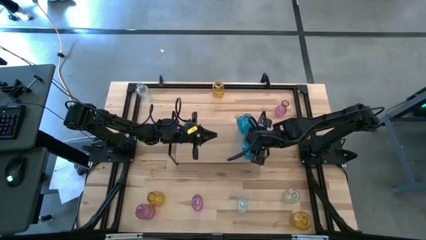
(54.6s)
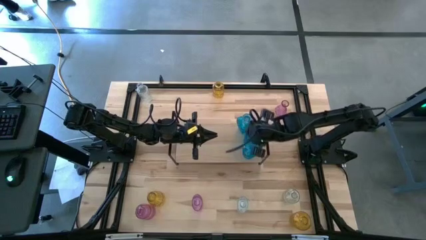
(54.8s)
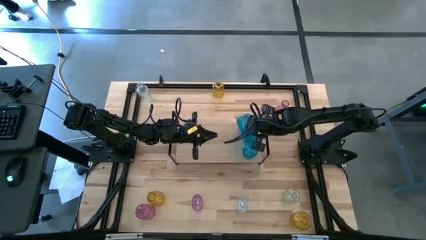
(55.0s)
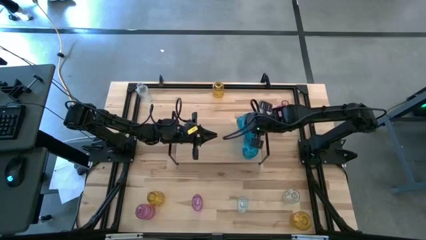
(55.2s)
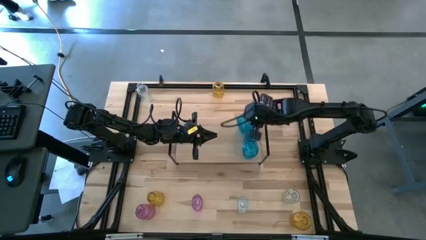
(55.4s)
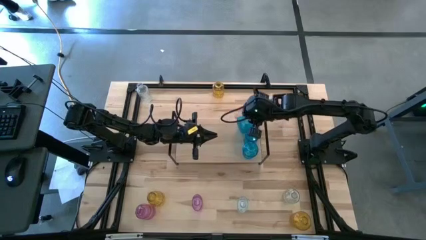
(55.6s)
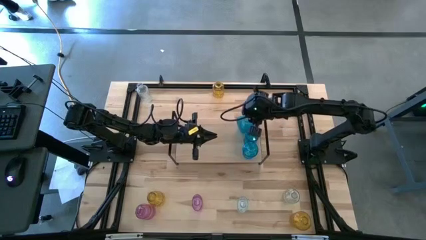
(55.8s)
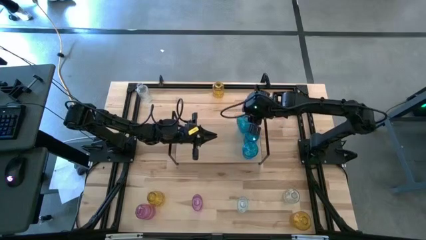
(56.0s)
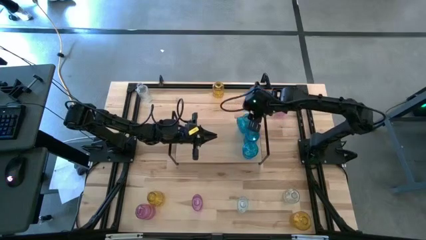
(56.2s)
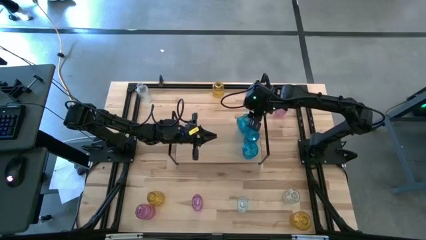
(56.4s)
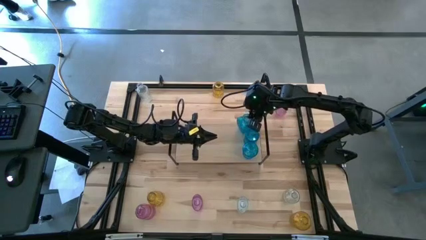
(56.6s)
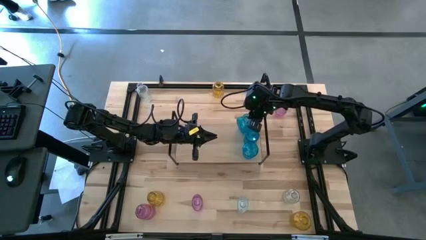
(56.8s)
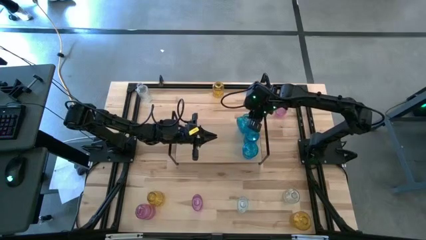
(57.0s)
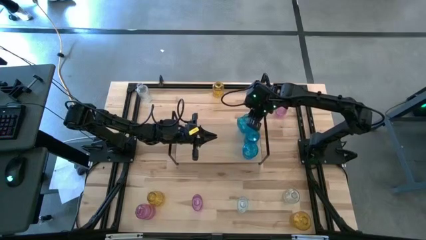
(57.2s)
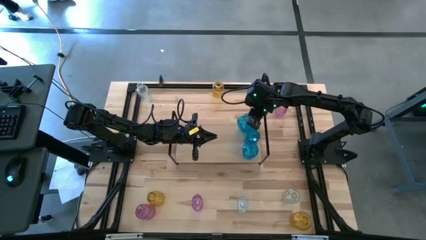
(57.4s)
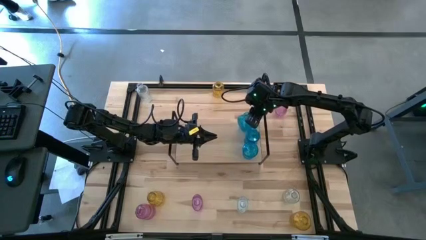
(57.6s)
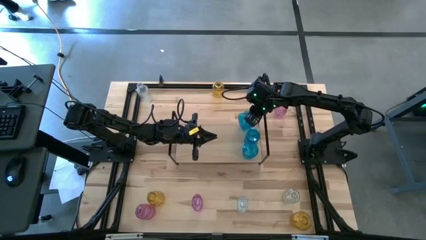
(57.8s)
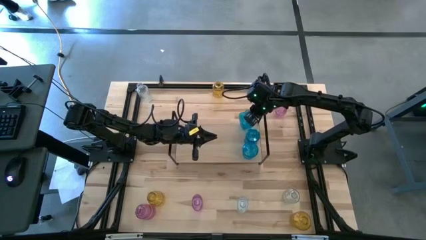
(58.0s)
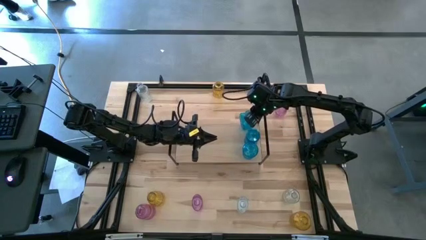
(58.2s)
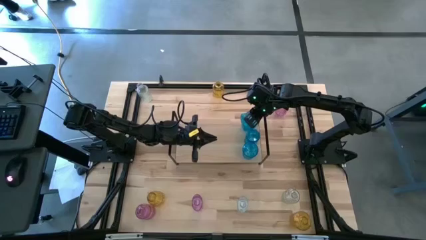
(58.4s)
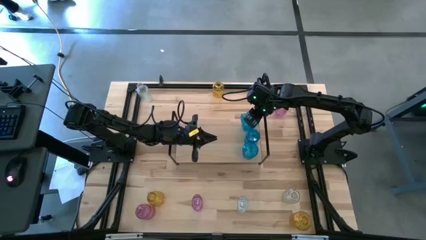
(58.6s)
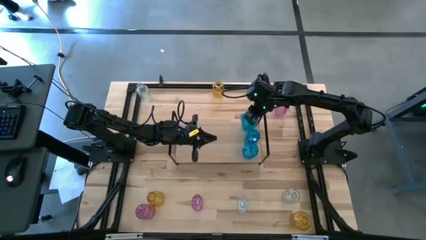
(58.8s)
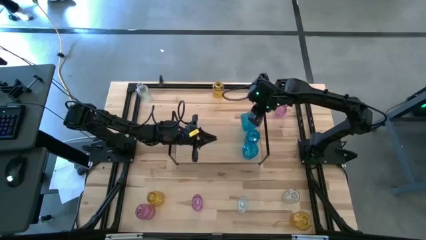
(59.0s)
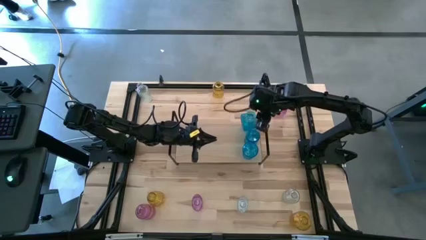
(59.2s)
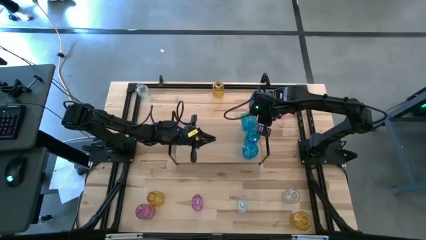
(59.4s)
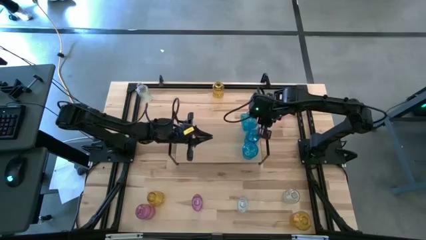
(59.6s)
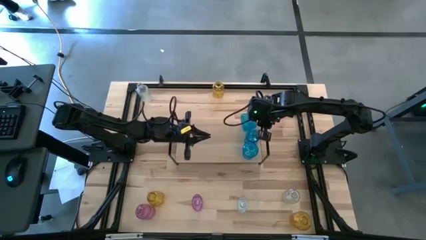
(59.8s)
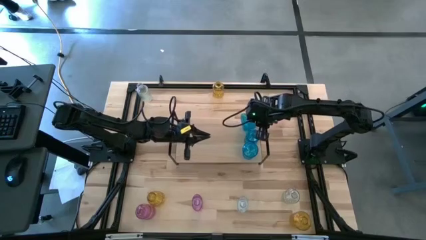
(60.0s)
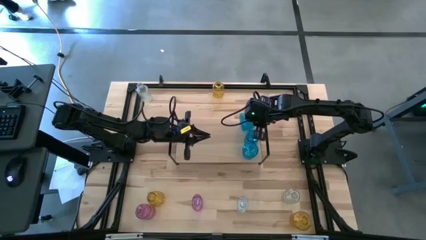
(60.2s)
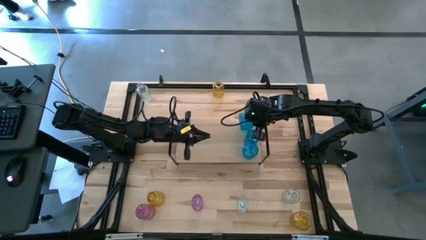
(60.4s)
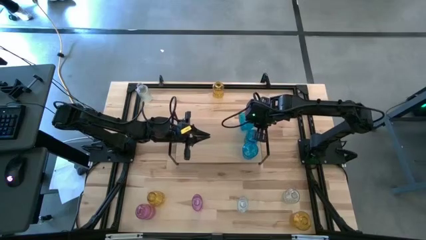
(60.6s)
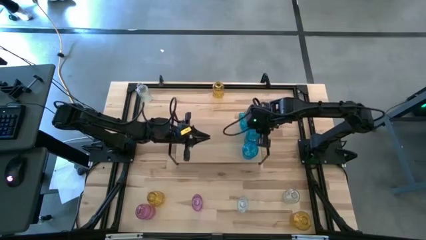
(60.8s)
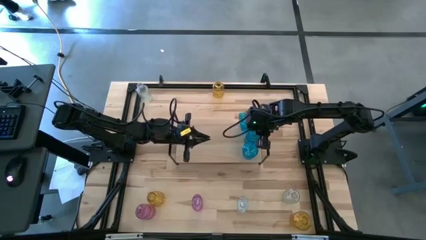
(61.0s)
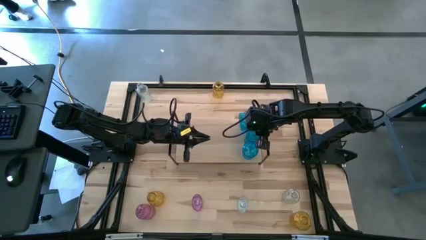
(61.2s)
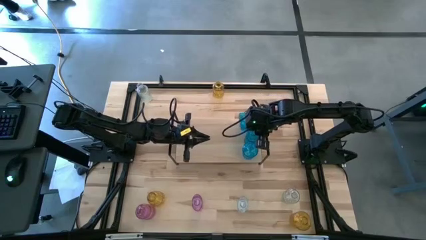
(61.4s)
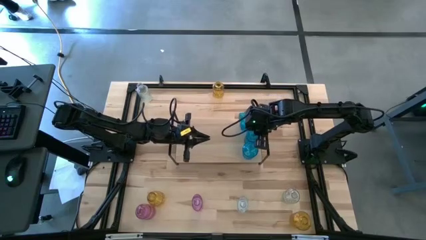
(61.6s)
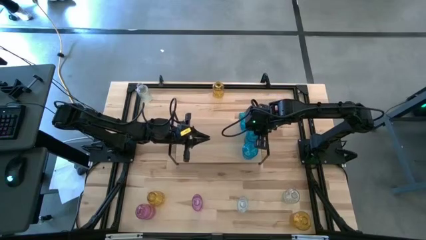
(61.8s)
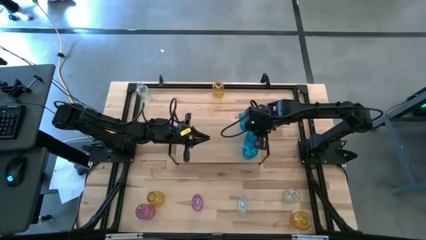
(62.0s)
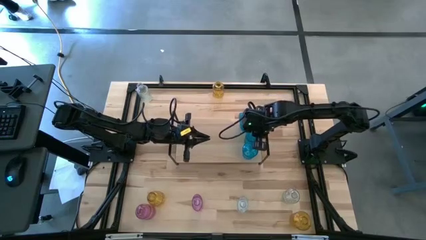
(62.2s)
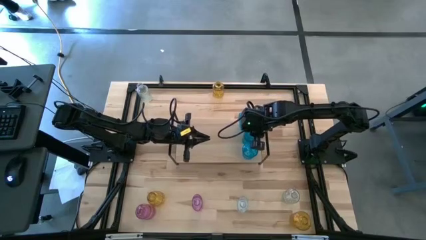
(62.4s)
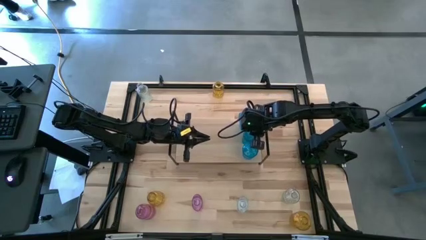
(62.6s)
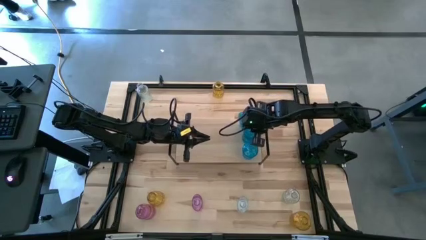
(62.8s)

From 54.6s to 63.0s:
Task: sort vases onto shelf
Adjust the blue vases on the shelf
